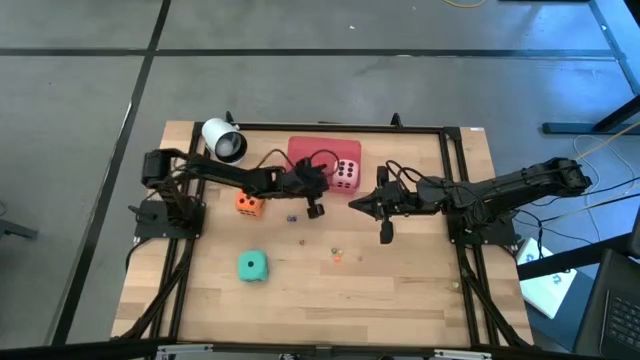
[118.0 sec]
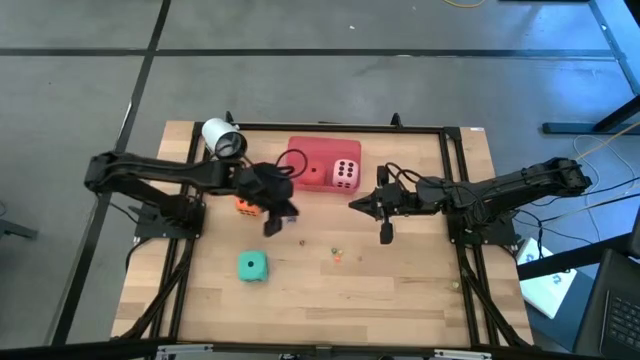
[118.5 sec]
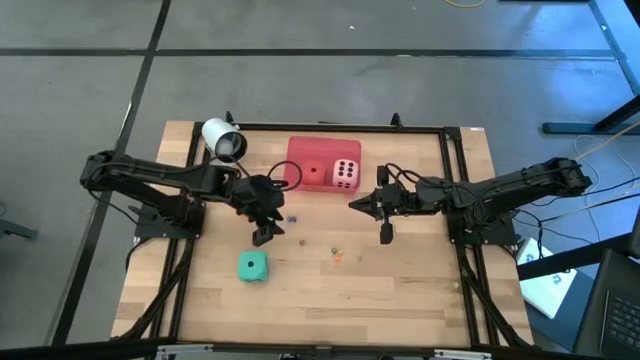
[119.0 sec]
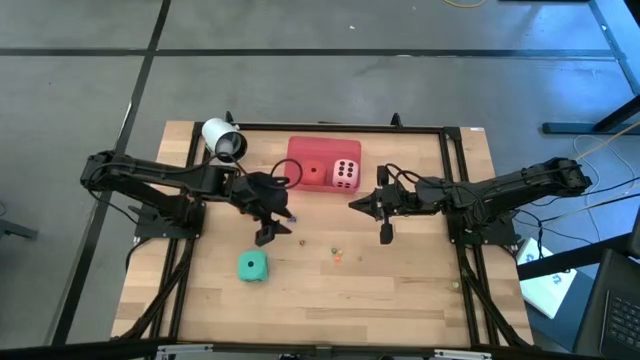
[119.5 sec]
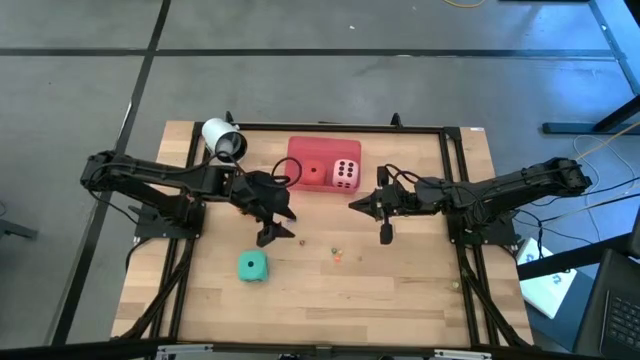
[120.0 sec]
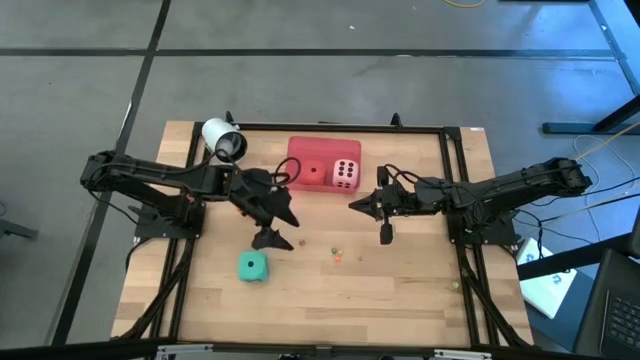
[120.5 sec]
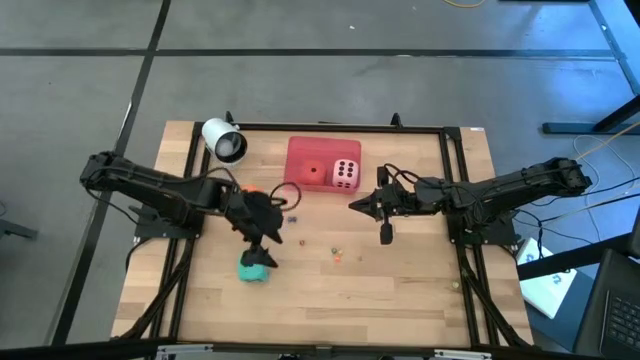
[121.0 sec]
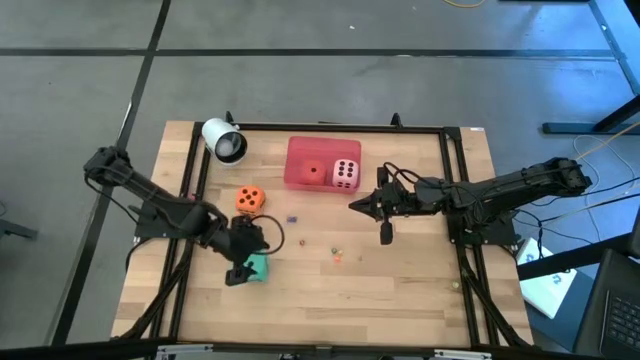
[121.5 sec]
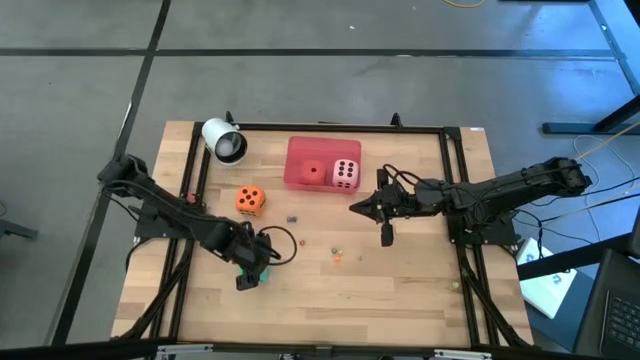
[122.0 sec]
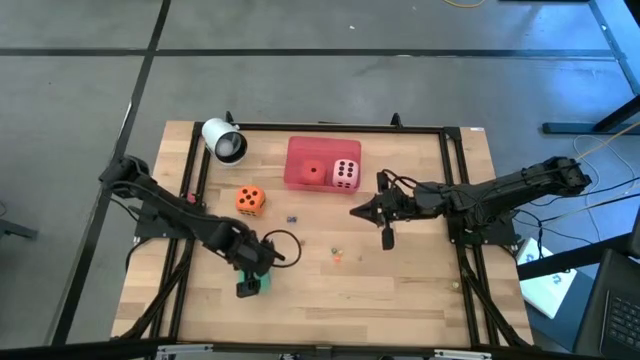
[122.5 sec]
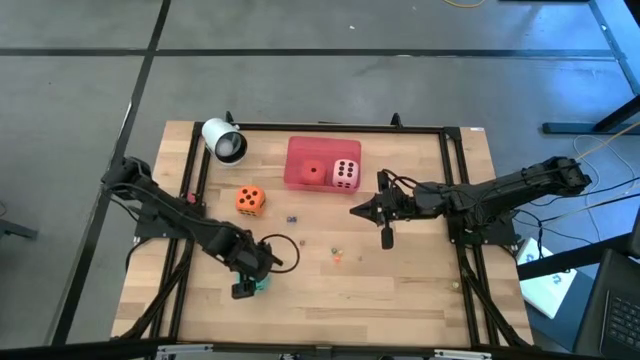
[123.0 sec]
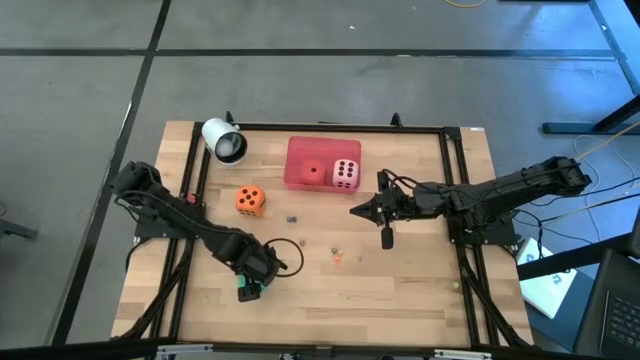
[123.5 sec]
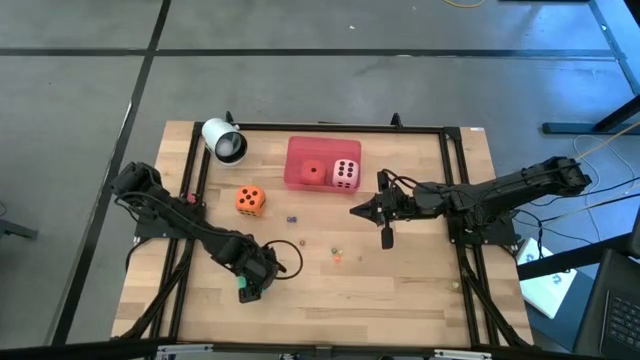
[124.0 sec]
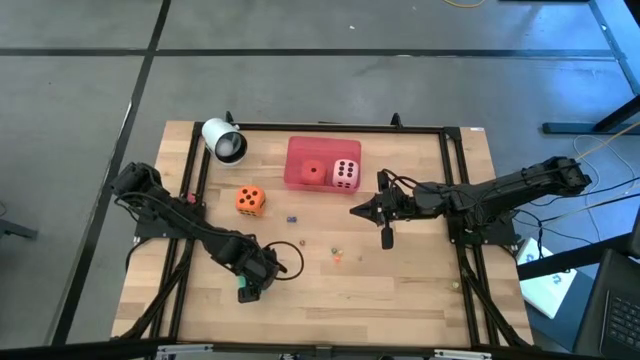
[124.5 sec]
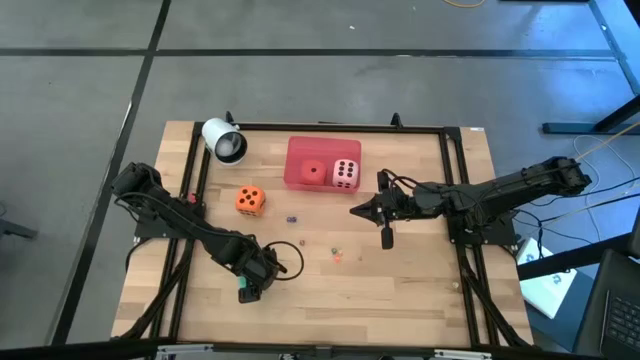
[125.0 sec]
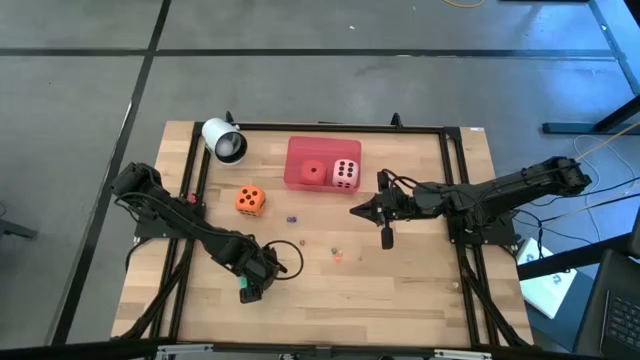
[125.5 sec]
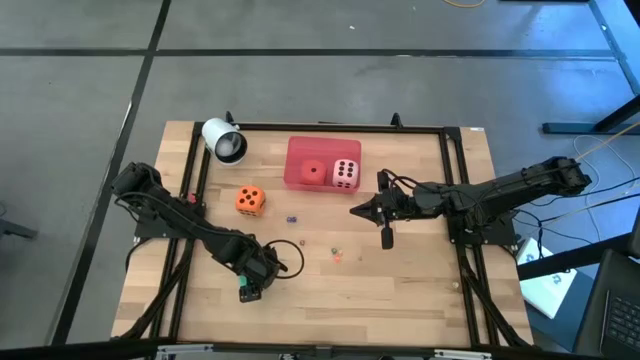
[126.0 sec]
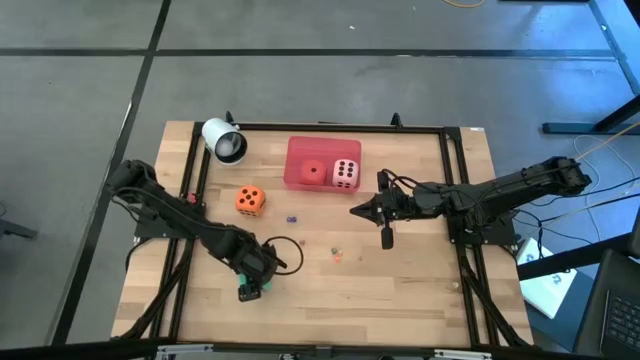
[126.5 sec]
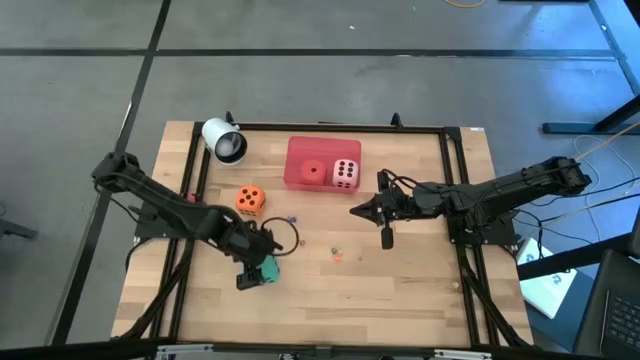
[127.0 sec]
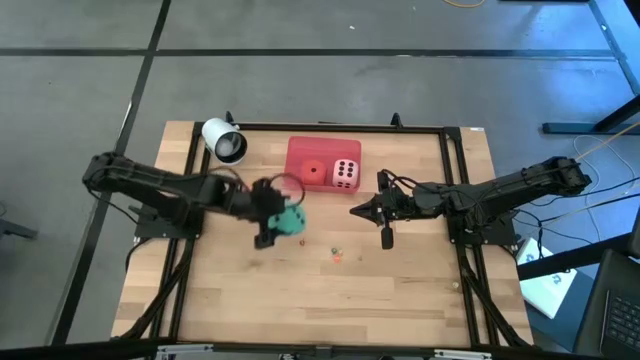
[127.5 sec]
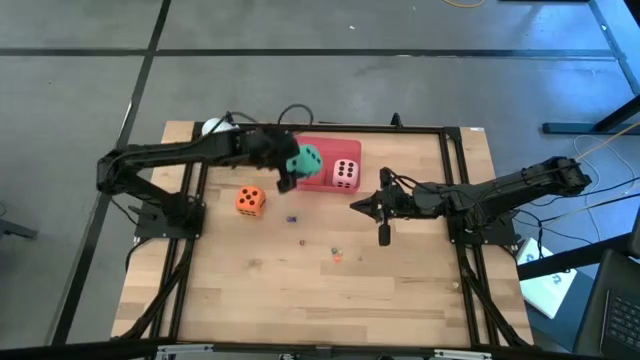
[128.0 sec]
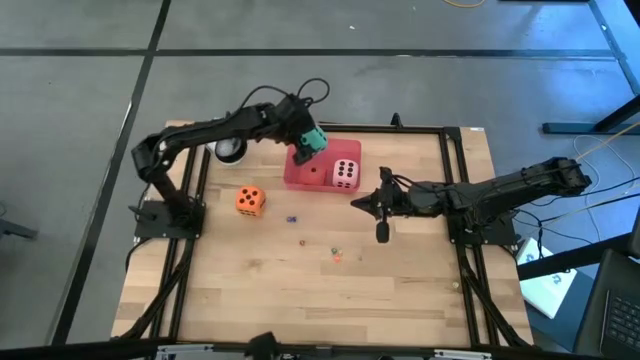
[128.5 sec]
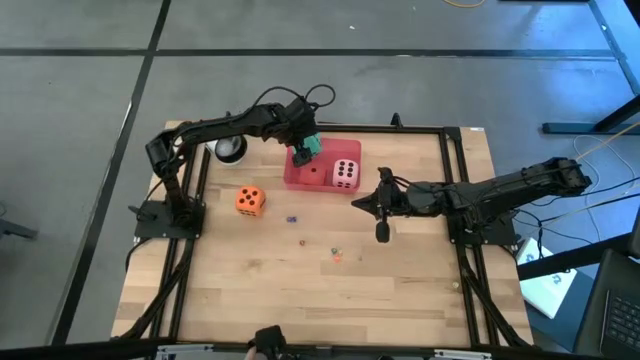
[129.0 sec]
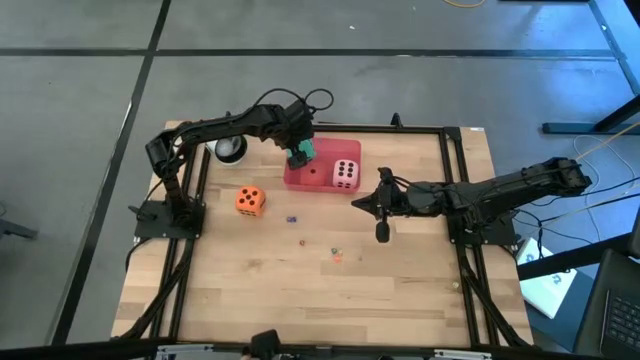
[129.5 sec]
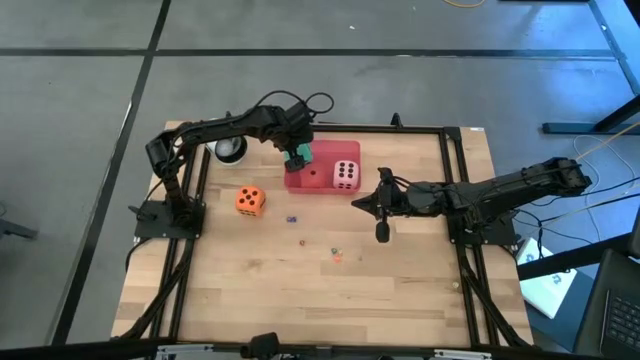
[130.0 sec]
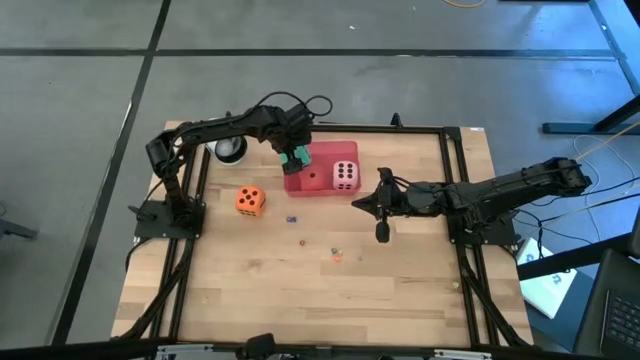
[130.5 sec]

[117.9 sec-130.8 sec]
Task: Pick & Place Dice
Put the big blue dice into the pink bin

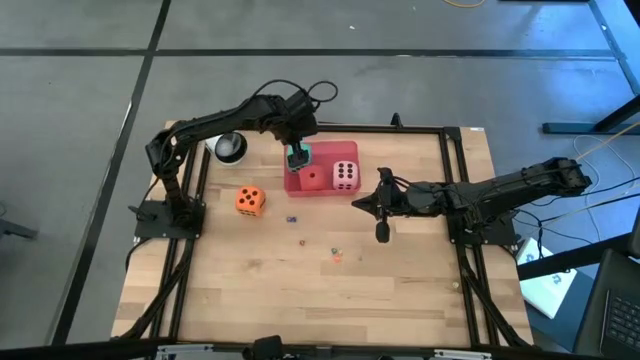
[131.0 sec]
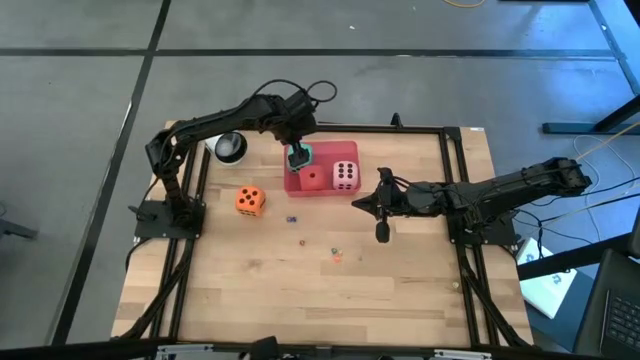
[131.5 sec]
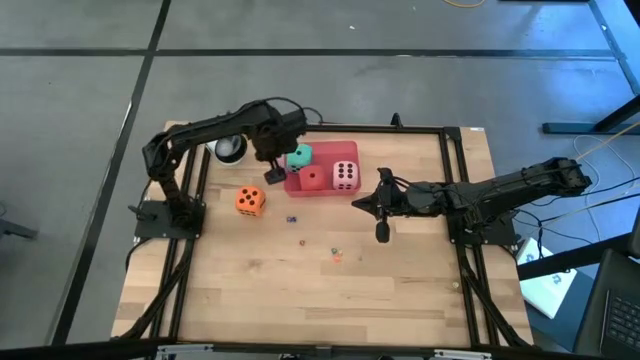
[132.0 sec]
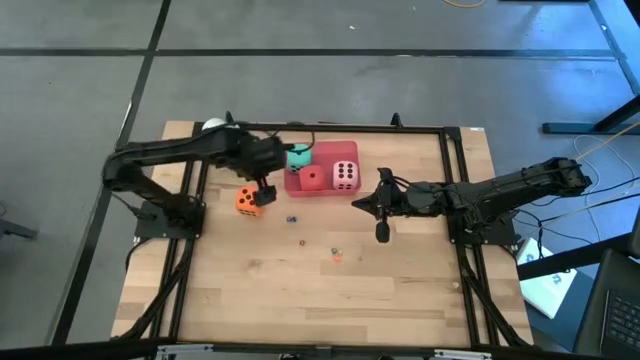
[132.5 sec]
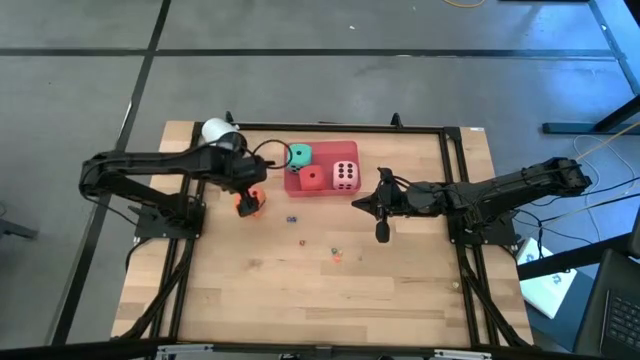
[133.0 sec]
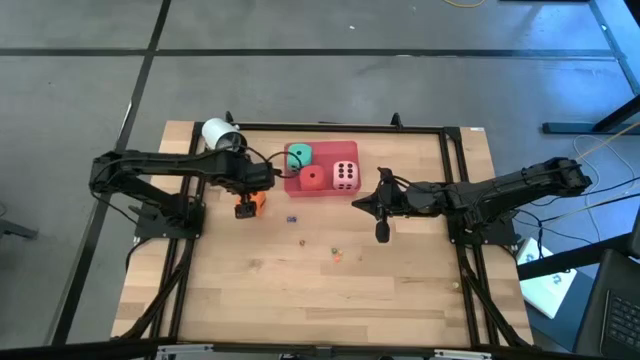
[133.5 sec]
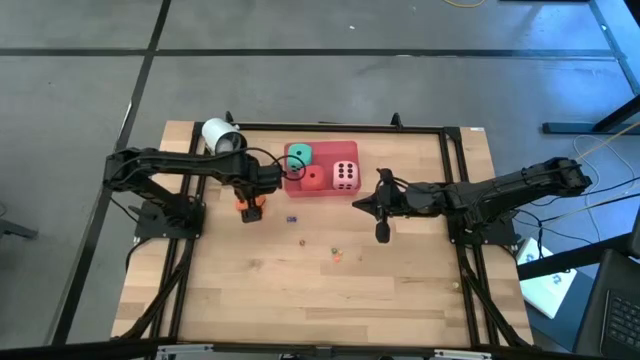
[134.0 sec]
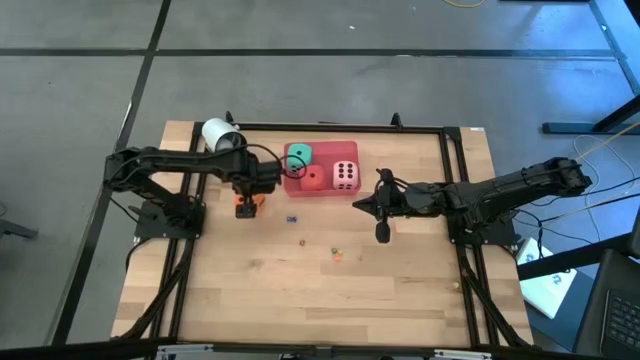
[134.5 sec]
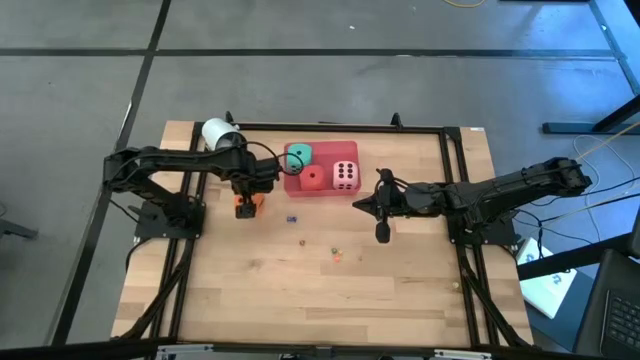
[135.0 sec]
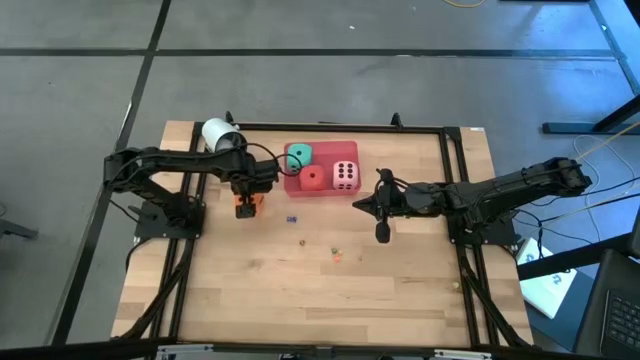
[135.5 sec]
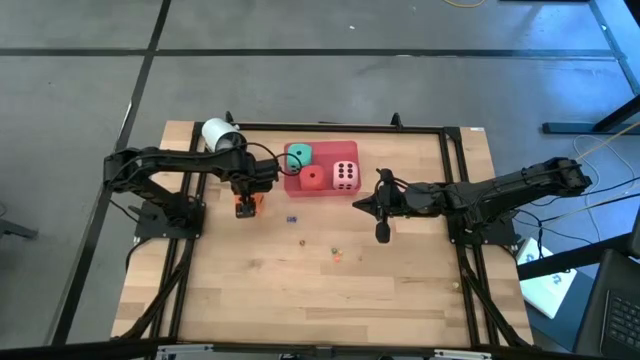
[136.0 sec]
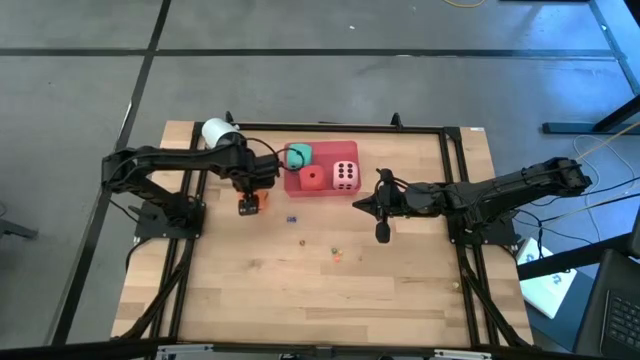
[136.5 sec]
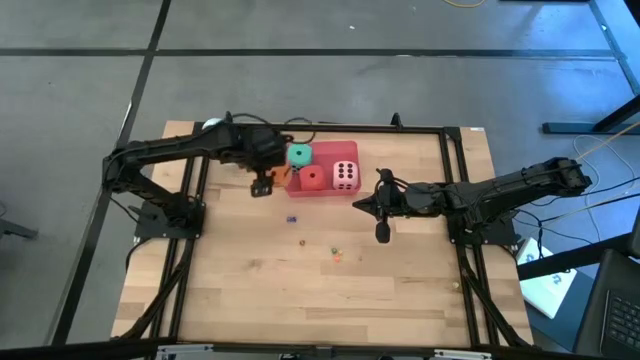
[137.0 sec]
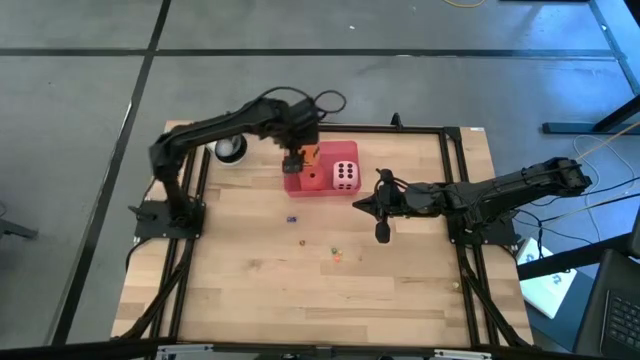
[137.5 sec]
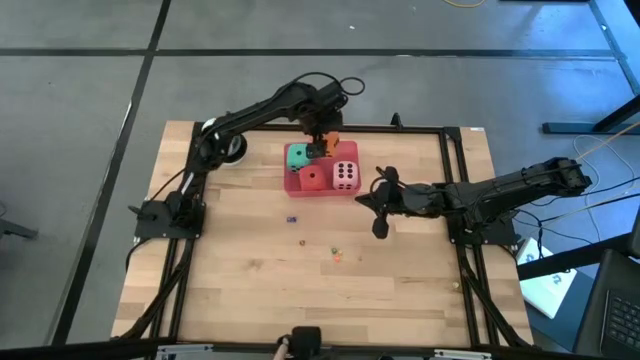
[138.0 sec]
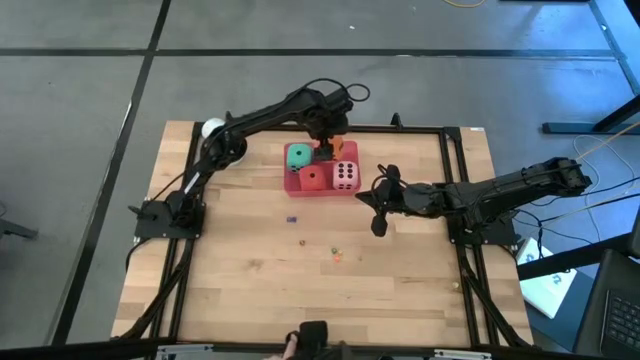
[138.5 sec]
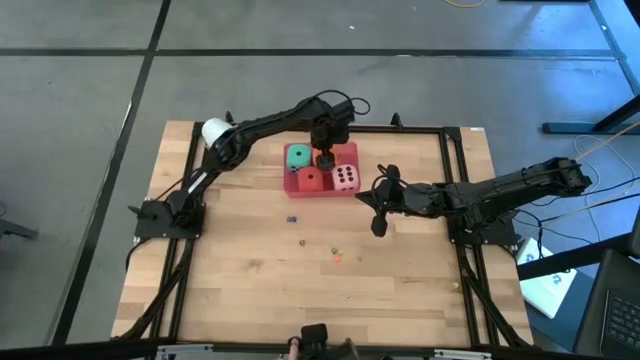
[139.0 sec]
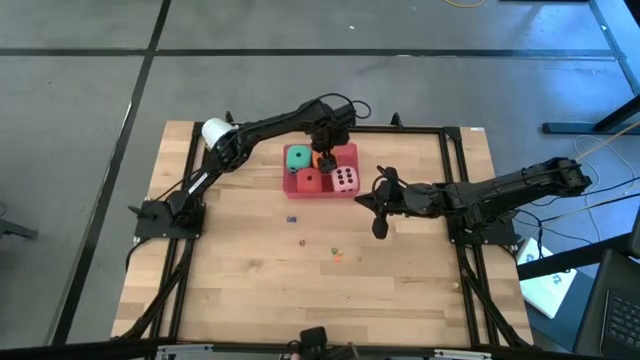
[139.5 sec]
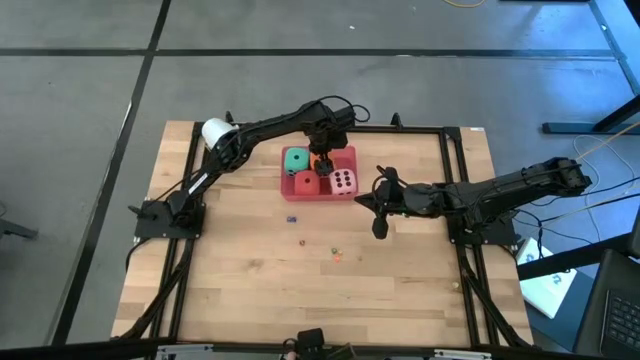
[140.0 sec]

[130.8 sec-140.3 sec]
Put the big orange dice into the pink bin
